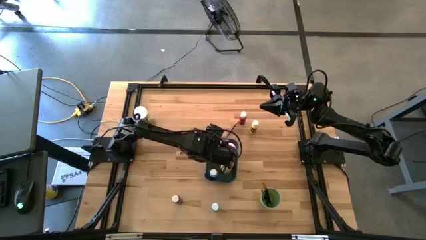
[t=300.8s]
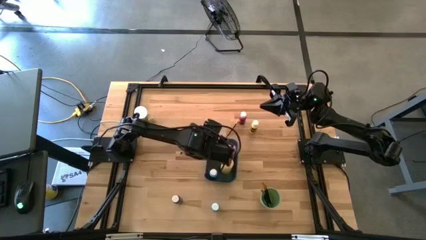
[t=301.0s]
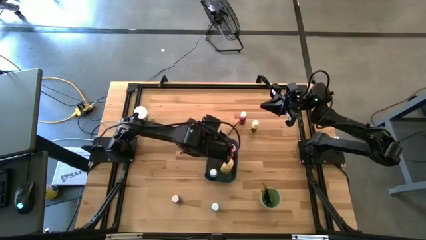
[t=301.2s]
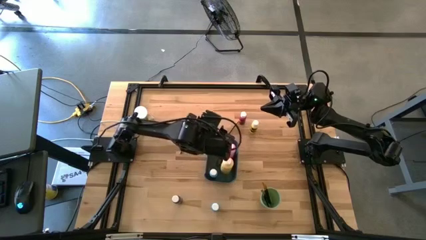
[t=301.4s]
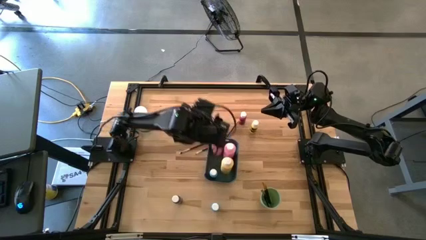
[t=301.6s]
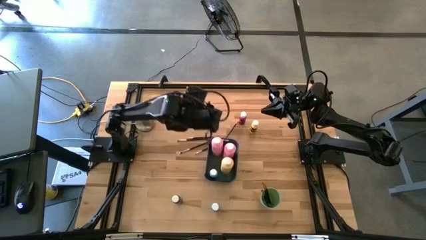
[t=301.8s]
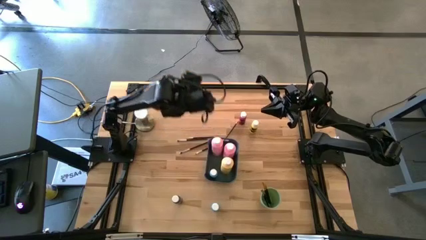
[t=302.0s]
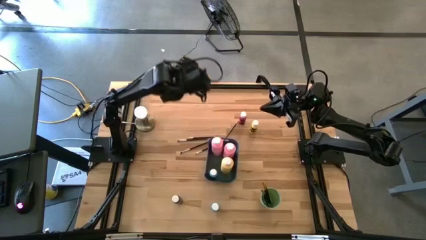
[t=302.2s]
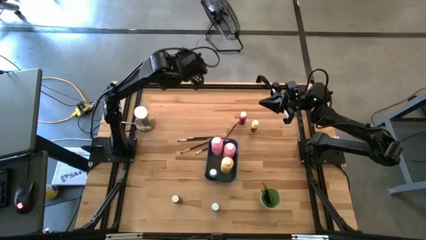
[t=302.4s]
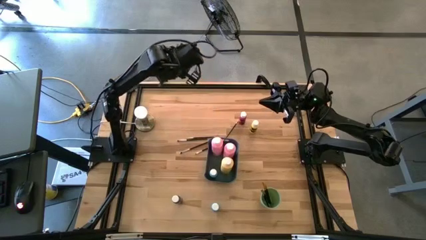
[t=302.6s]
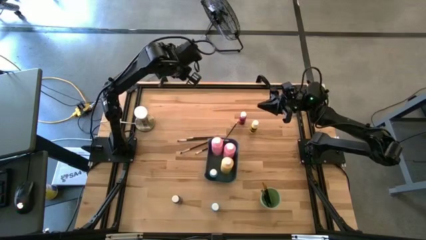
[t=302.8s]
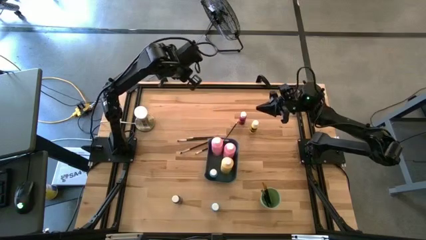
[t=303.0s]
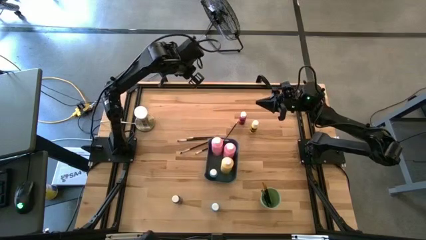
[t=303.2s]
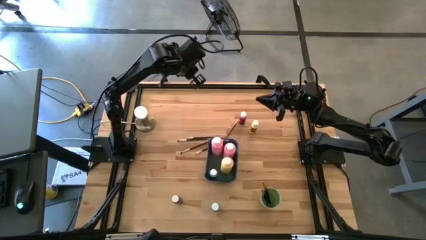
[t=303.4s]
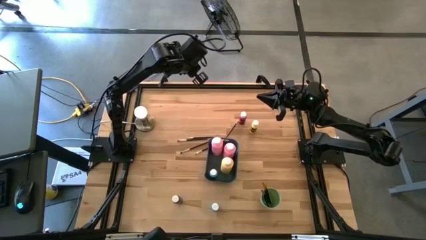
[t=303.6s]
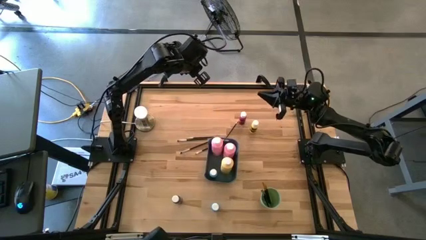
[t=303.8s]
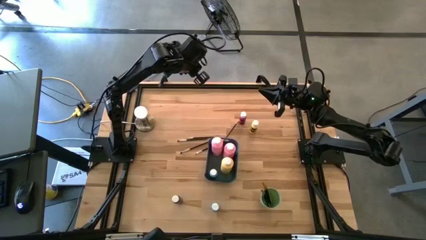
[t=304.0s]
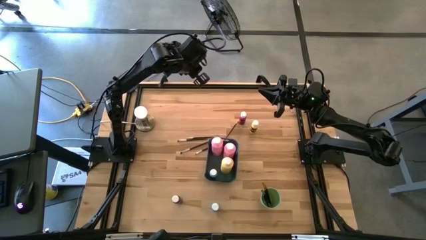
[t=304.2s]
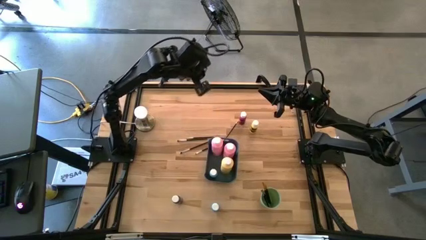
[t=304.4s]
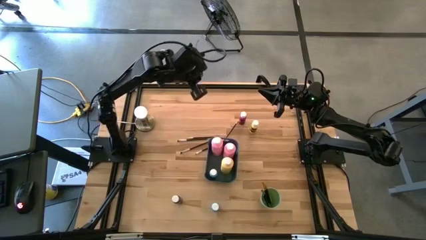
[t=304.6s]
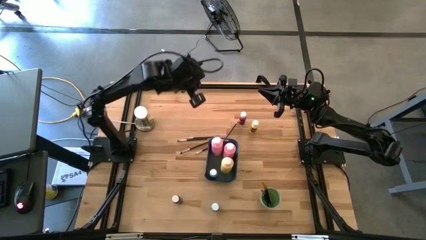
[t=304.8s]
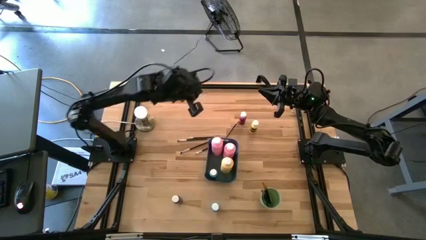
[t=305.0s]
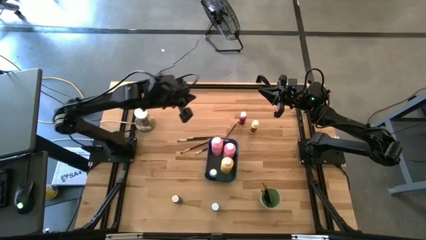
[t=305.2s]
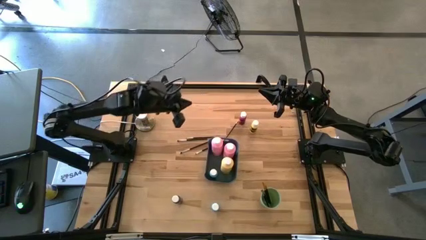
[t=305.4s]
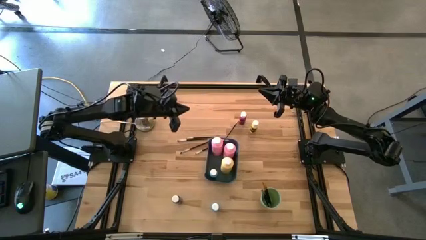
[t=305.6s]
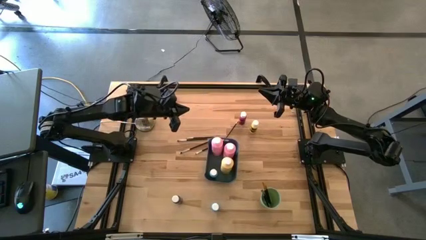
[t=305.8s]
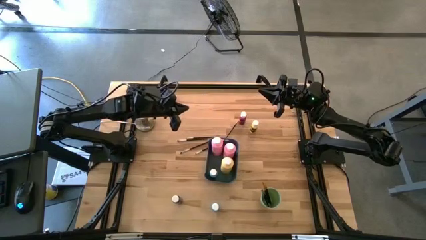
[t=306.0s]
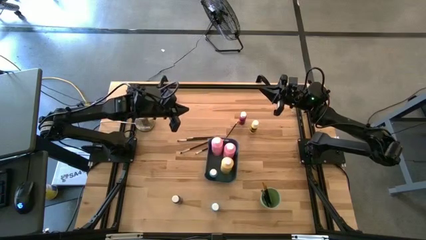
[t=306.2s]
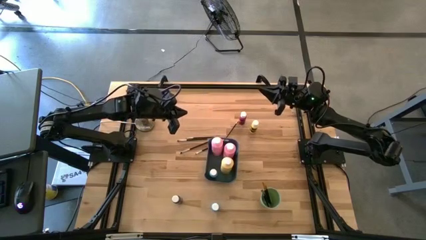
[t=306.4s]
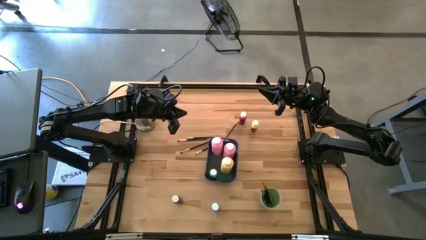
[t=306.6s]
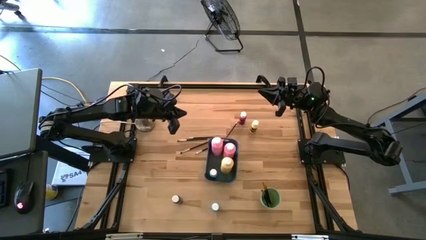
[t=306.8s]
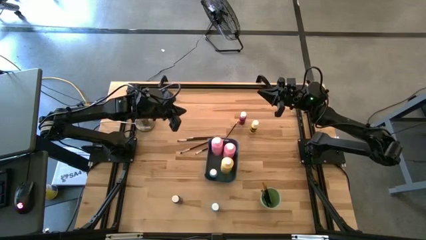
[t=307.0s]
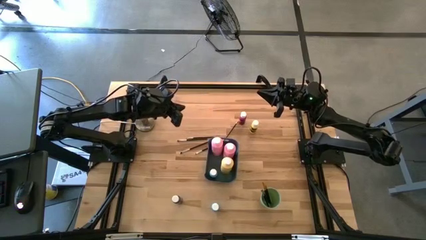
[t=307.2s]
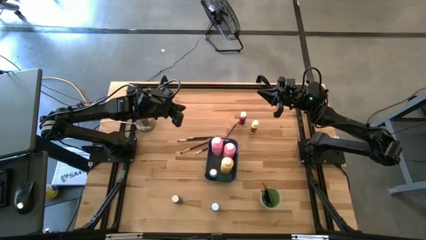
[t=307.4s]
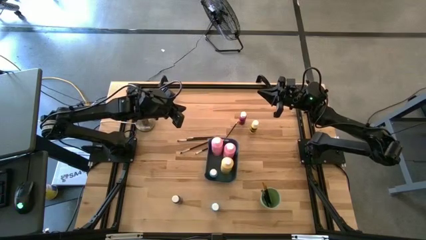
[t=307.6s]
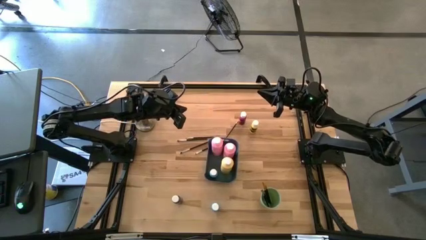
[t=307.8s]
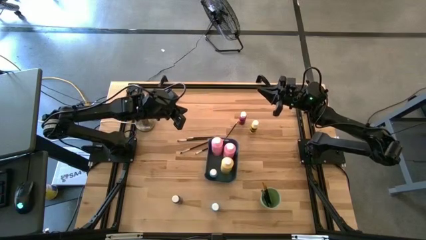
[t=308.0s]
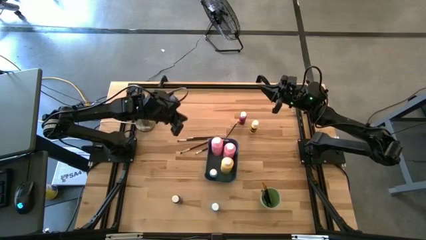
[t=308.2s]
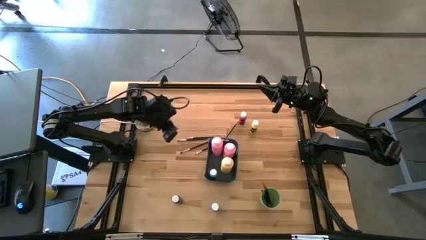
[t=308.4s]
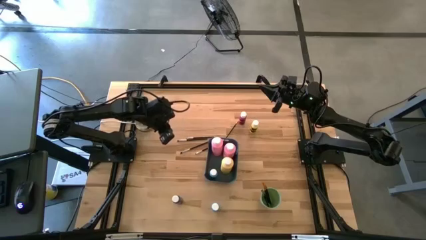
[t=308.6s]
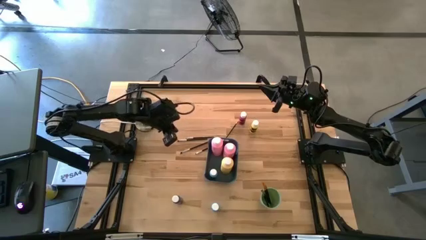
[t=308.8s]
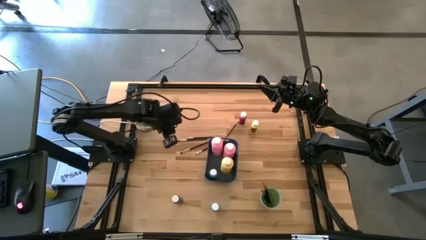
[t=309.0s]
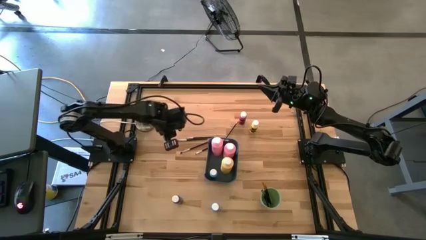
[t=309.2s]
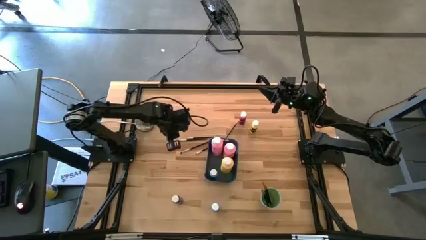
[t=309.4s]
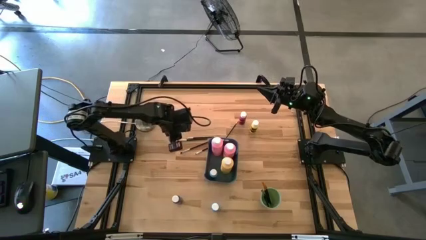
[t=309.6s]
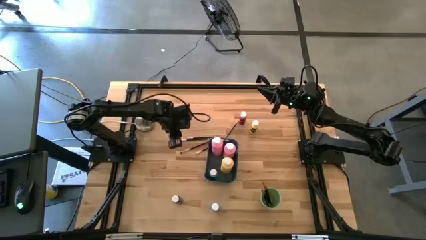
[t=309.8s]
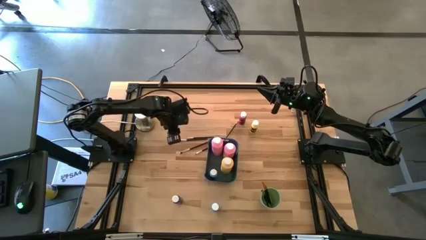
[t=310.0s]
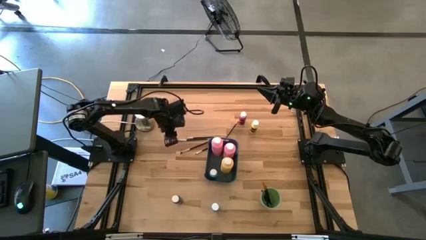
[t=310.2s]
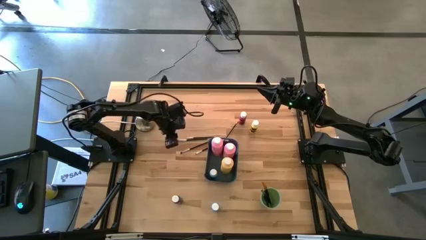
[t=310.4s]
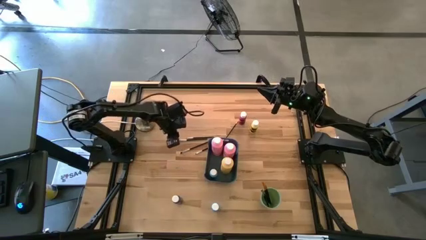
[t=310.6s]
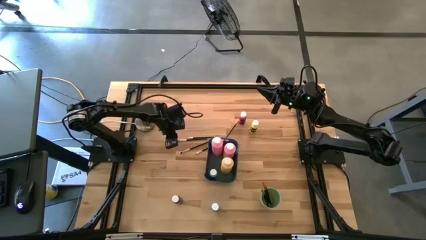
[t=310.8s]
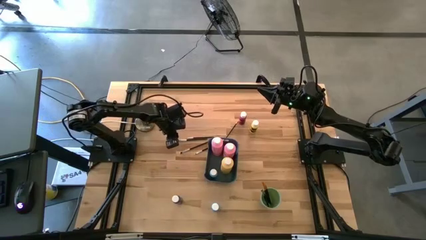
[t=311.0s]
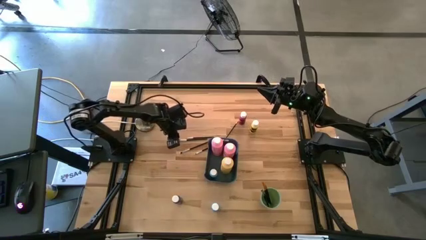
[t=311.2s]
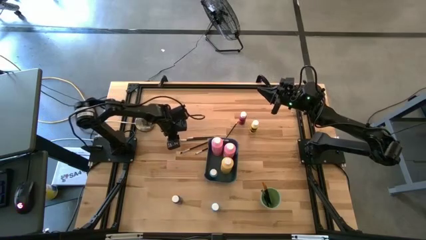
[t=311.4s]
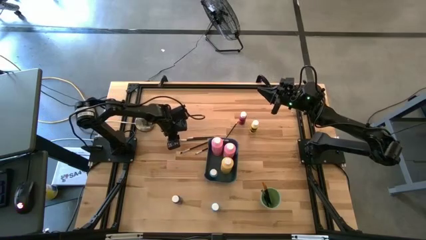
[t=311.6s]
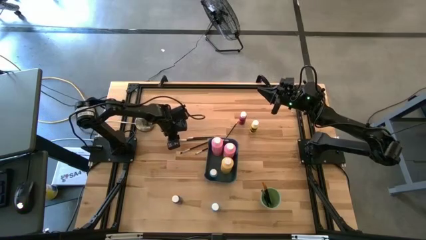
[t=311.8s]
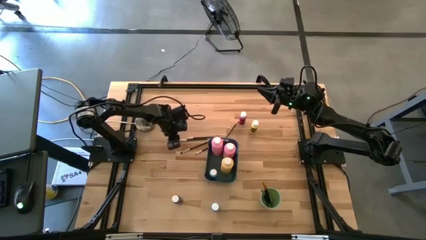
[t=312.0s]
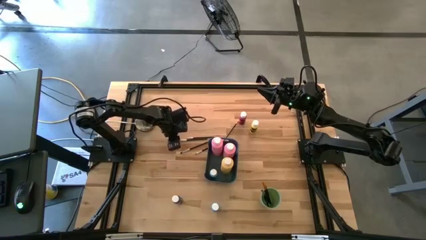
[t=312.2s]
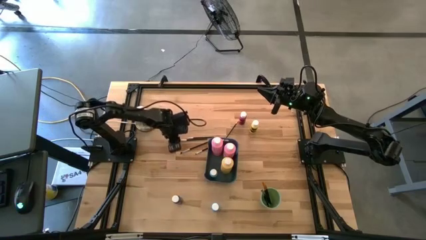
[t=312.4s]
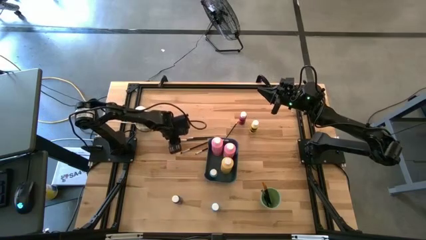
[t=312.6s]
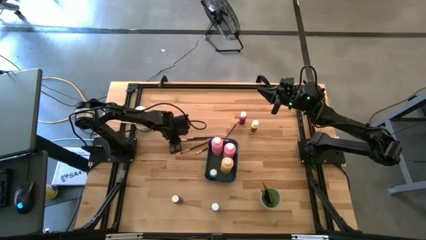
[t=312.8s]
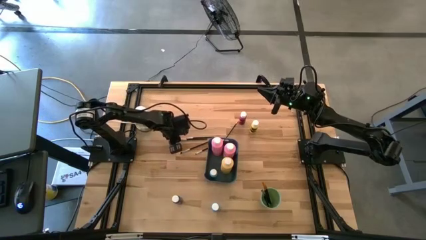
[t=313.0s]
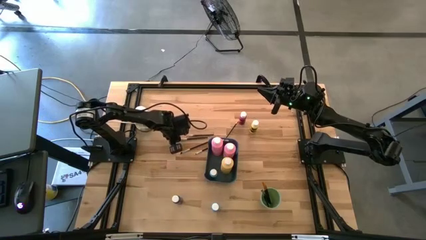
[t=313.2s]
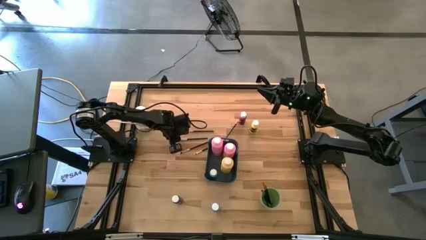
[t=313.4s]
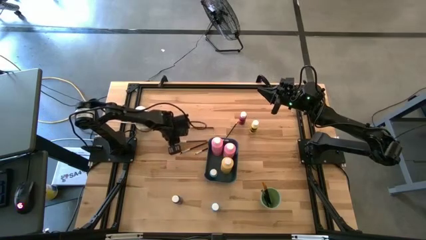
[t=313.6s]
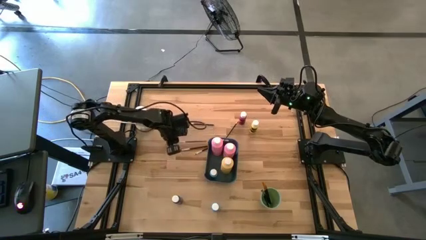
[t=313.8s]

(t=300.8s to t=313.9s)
Task: Pick & Place Paint Supplies
Put the black and silver paint brush into the green cup

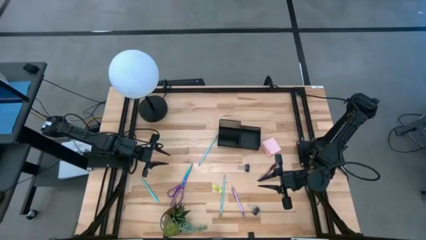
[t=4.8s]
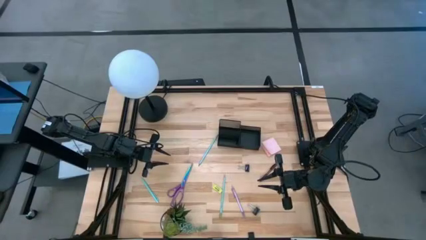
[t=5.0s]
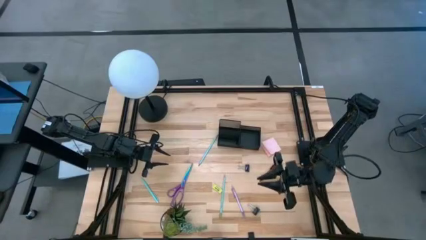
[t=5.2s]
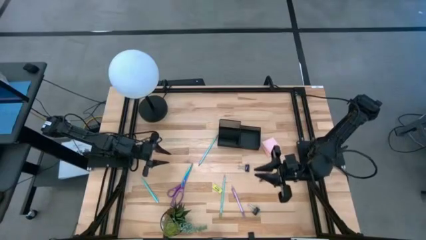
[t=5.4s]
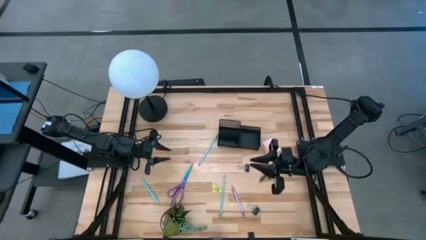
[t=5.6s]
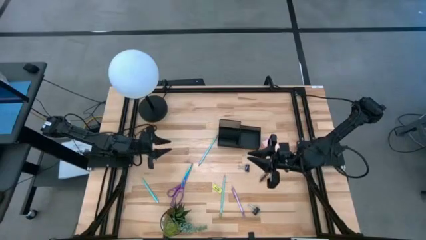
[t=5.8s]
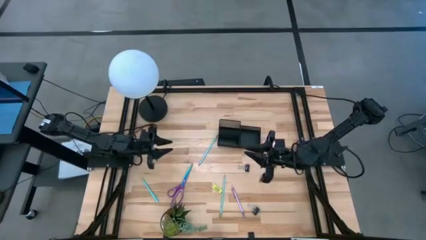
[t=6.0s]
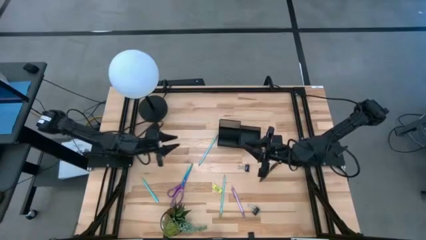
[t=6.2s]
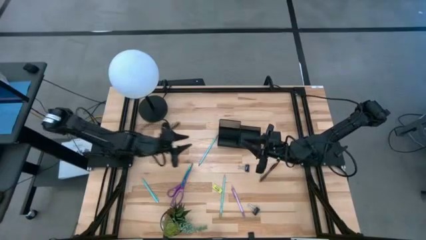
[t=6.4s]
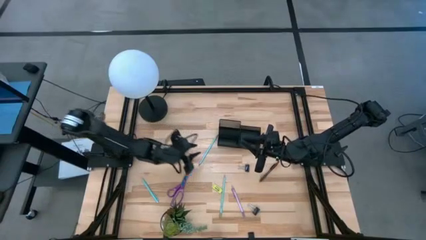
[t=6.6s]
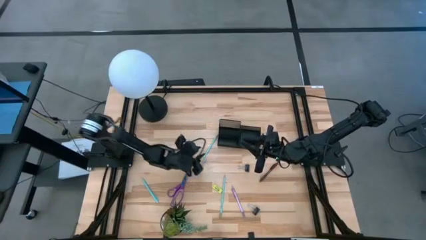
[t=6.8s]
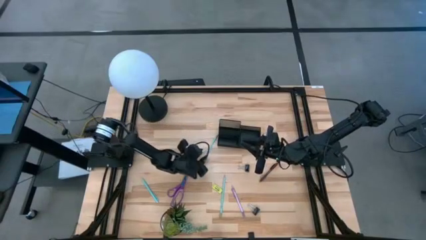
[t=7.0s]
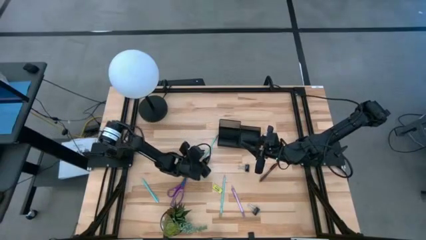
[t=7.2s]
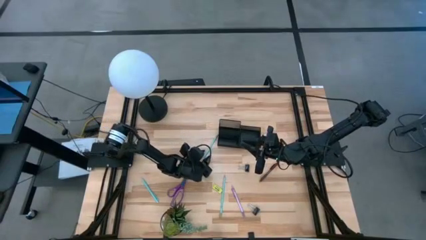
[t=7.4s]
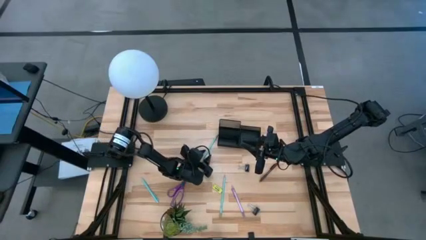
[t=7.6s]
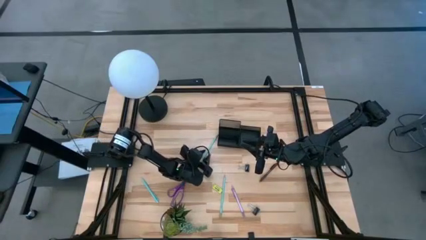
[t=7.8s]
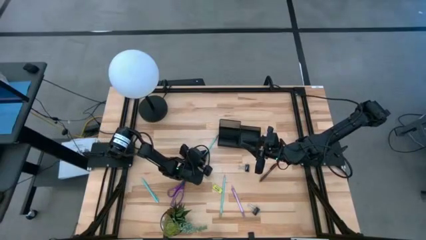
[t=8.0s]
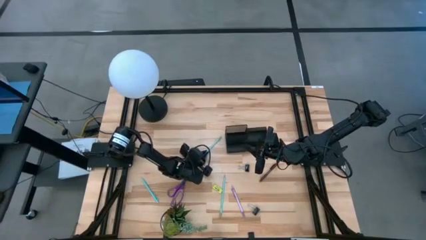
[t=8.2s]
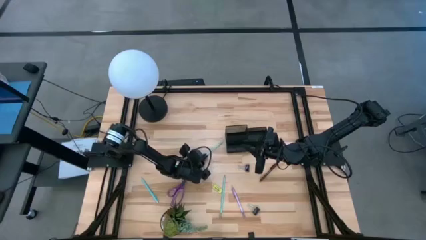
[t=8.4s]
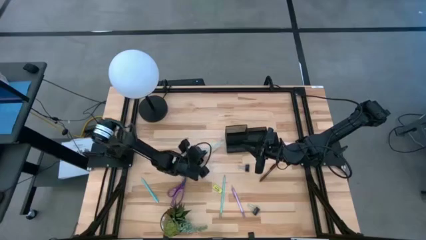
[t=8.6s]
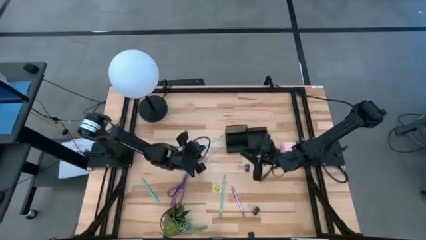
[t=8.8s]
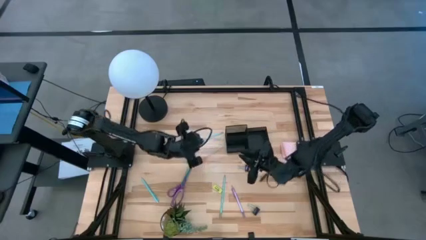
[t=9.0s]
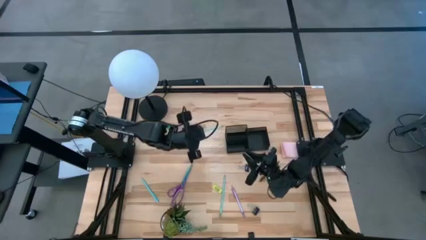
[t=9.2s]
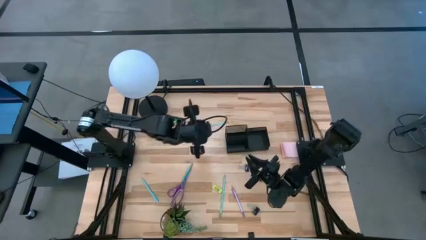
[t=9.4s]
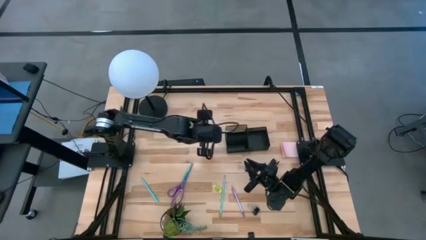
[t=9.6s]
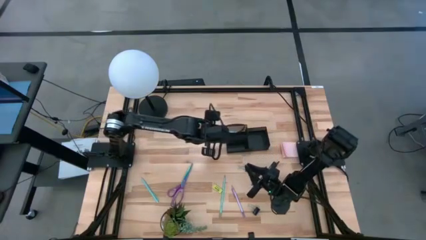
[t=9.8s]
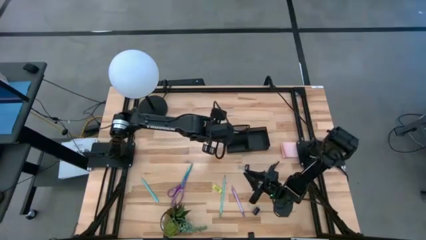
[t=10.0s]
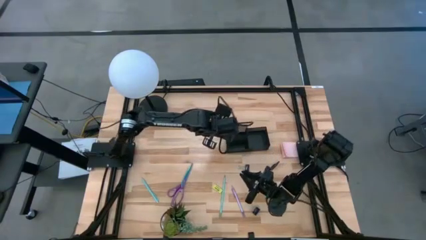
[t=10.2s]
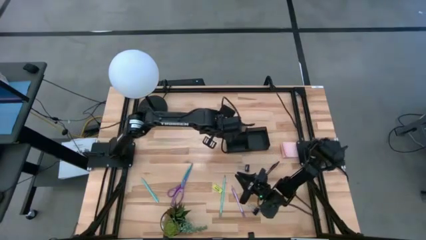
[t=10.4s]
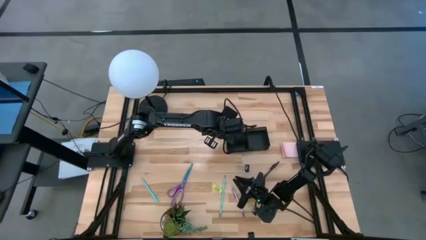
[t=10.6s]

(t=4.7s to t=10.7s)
Task: Pick and place office supplies into organizer
Put the top blue pencil into the black desk organizer
